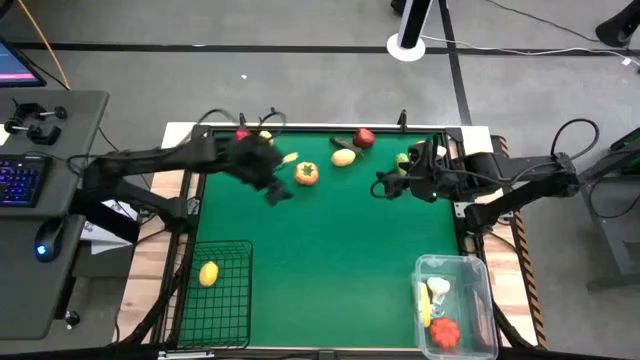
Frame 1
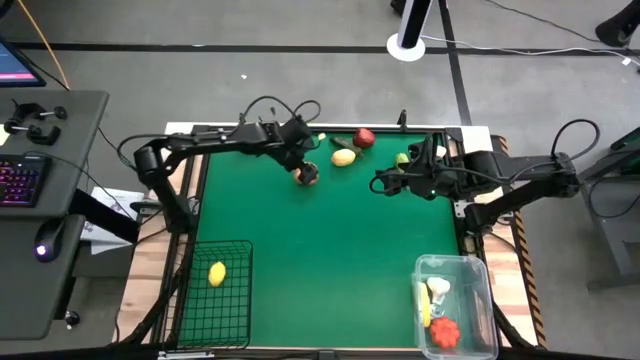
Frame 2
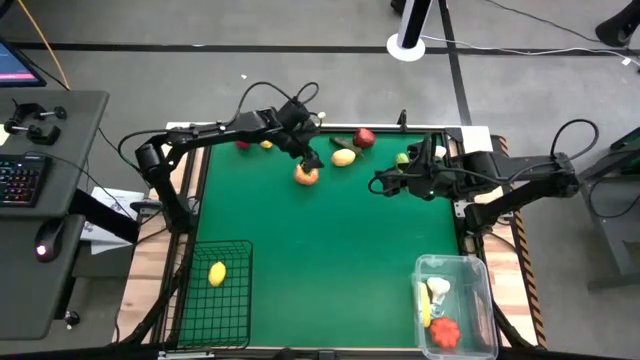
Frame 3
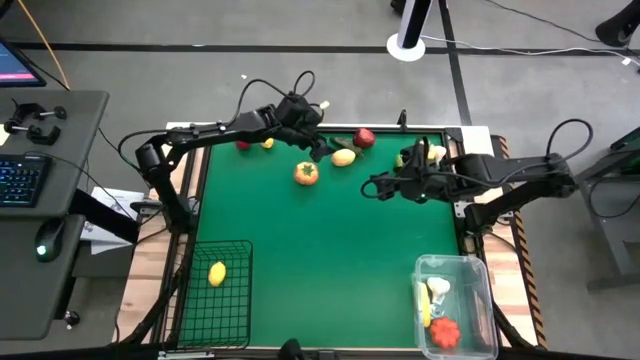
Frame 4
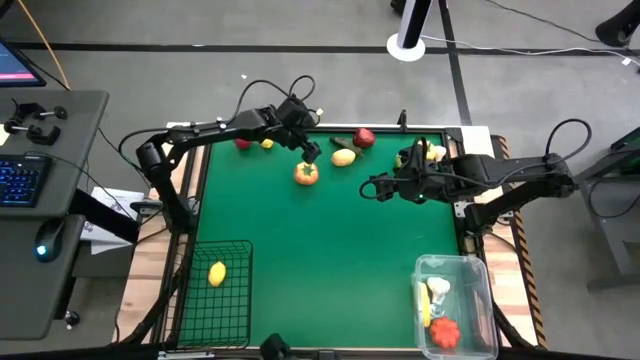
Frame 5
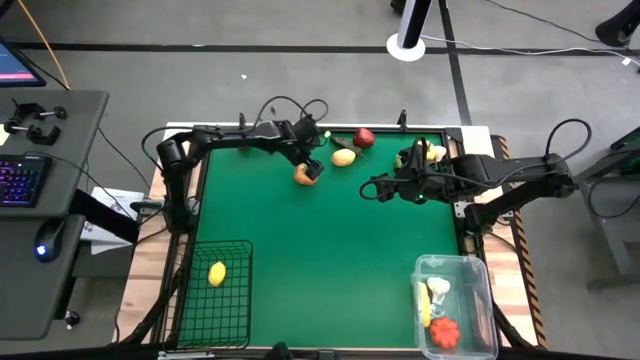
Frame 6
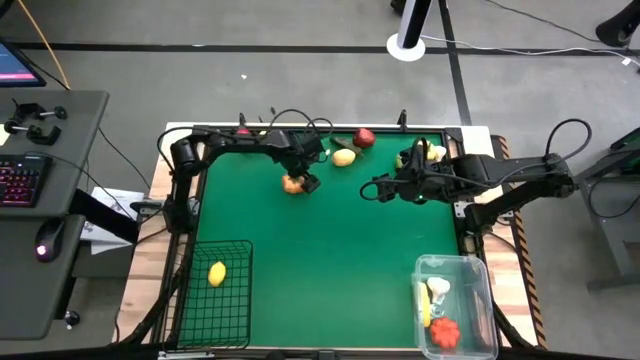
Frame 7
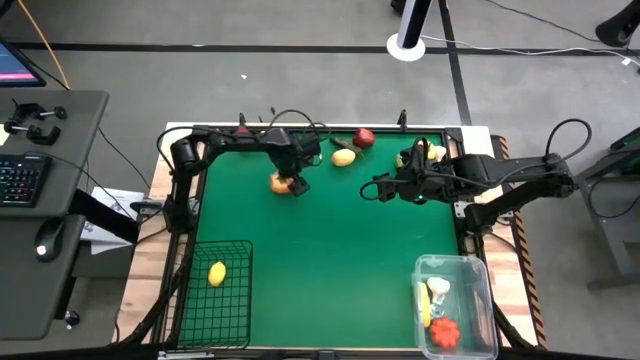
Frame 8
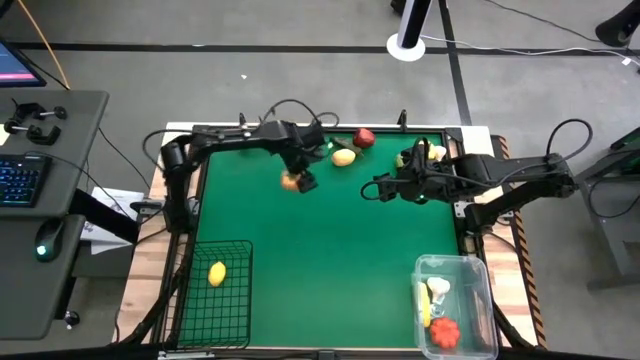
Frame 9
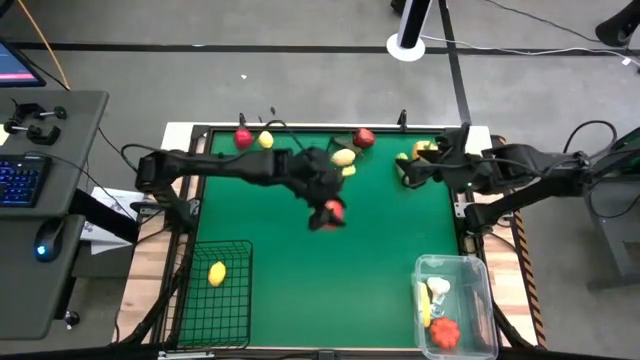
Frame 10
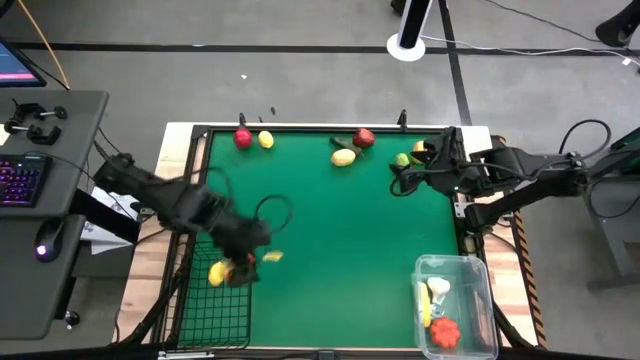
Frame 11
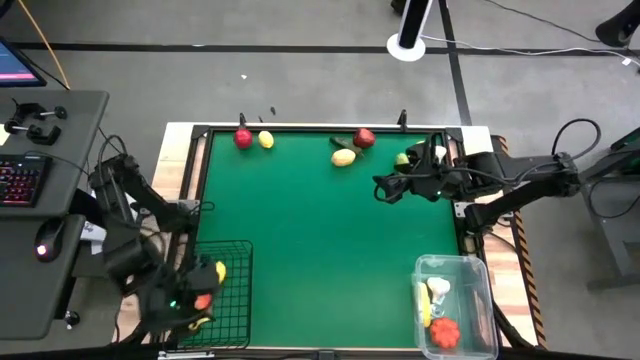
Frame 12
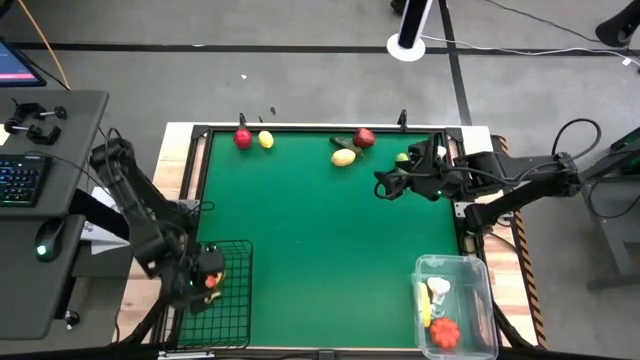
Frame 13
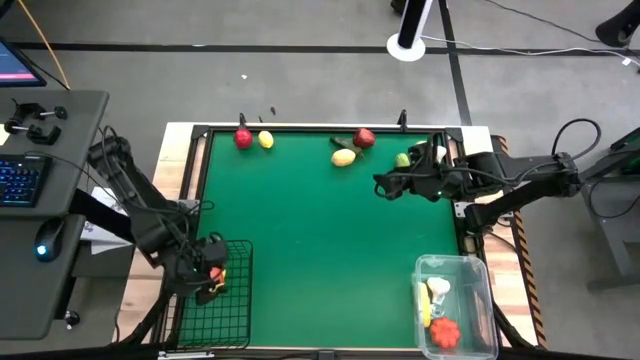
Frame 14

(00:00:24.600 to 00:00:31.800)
Task: Sort produce into baskets
Put the orange tomato into the black wire basket

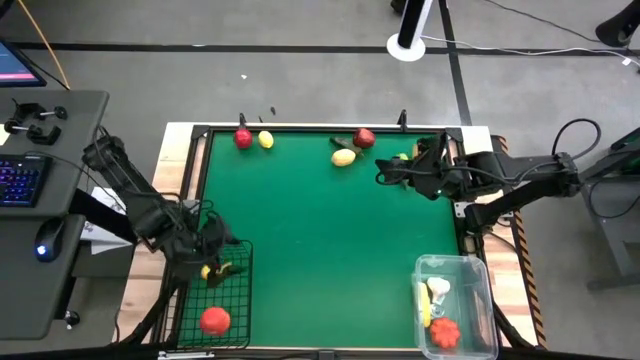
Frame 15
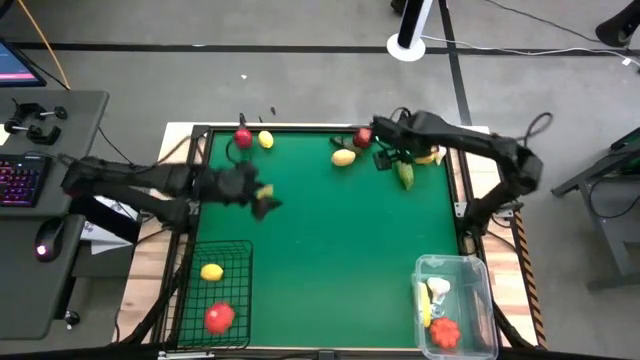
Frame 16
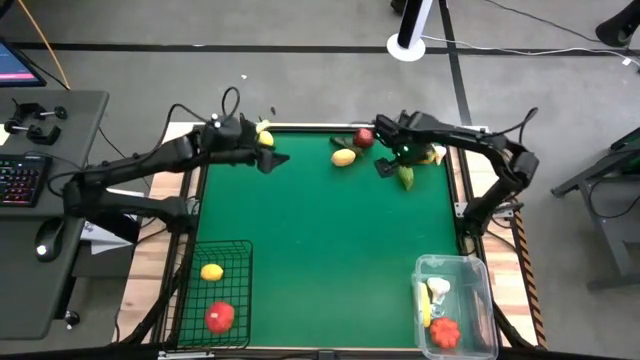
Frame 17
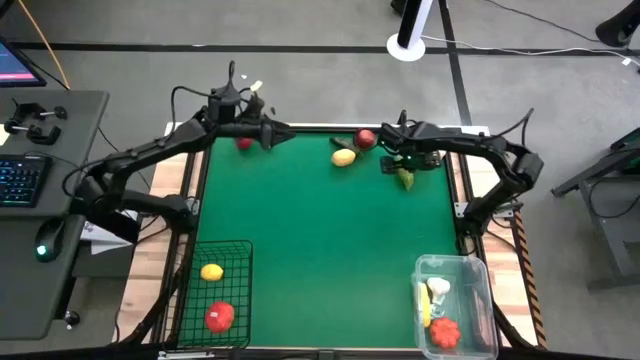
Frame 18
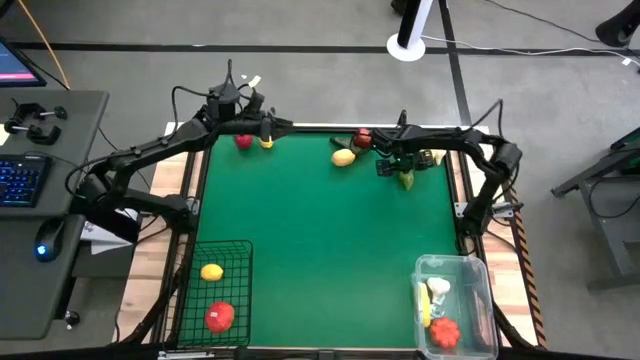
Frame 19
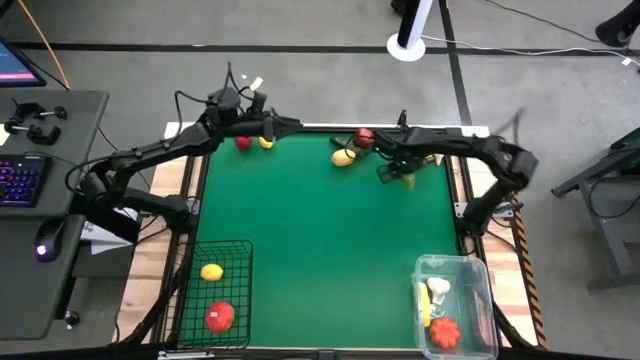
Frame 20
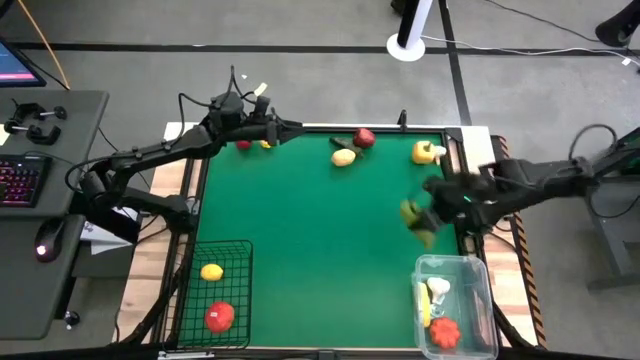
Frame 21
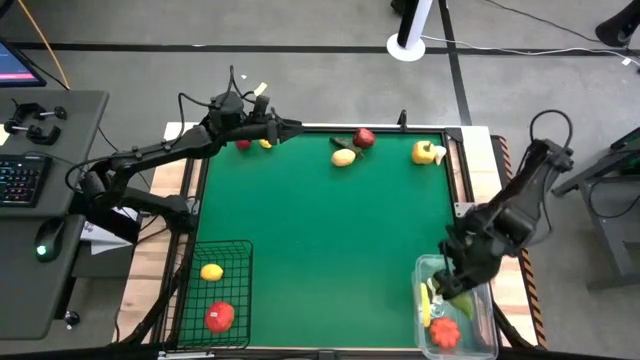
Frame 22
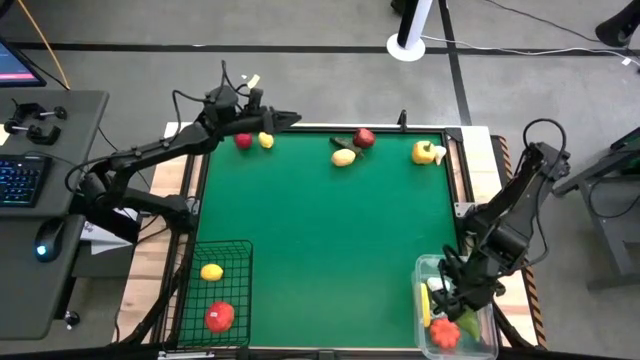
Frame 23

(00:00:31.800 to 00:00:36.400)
Put the green chayote into the transparent bin

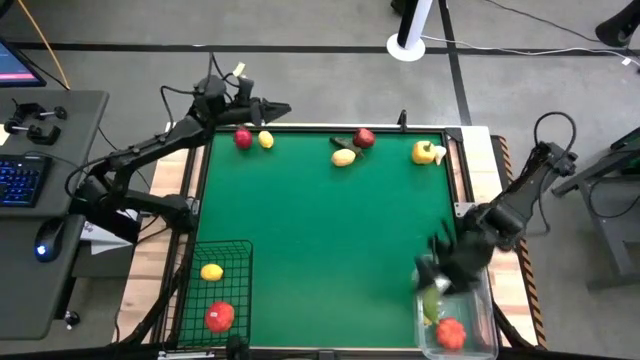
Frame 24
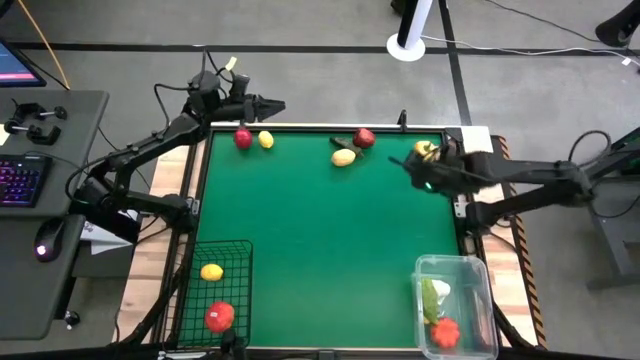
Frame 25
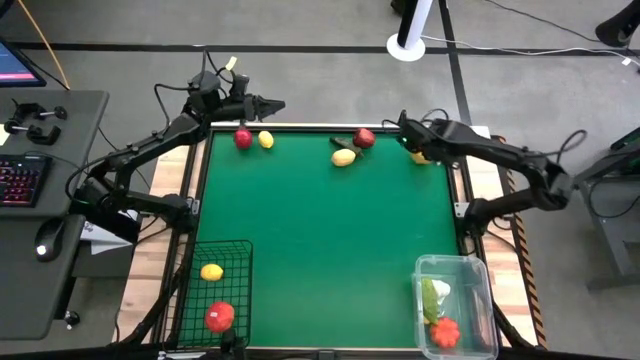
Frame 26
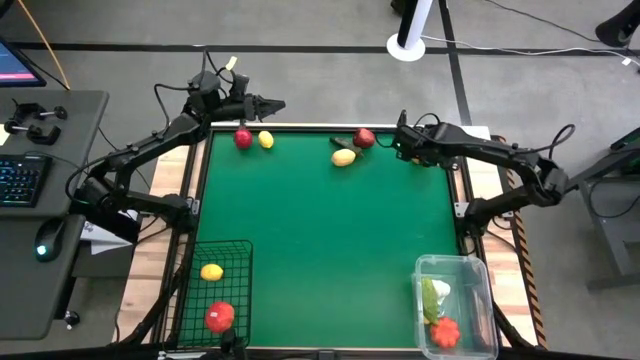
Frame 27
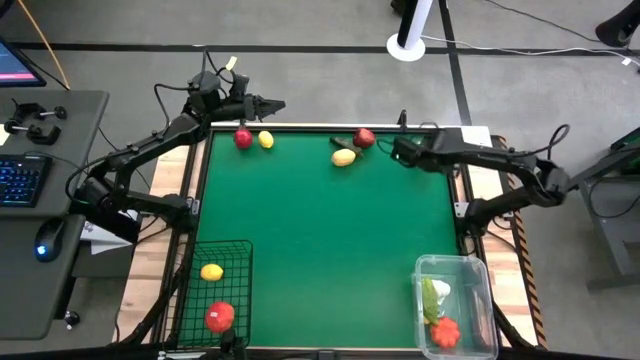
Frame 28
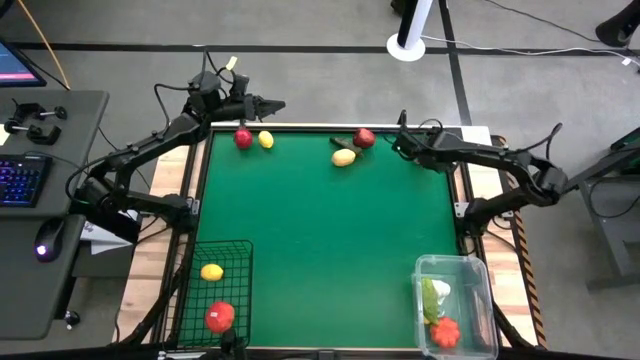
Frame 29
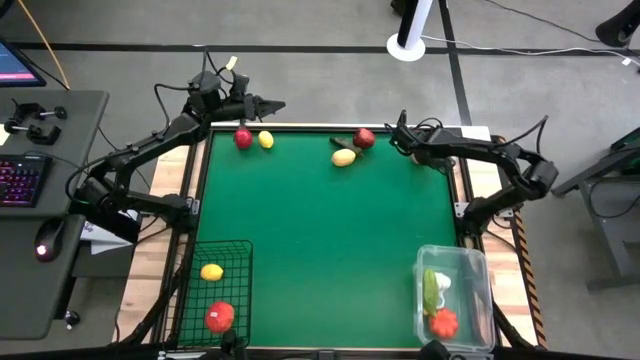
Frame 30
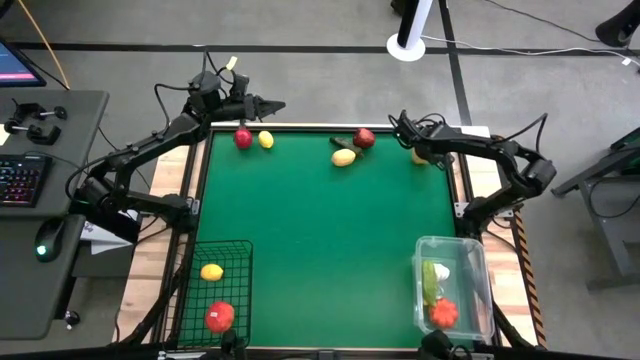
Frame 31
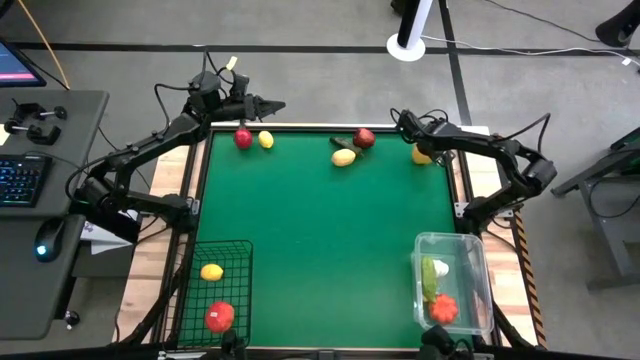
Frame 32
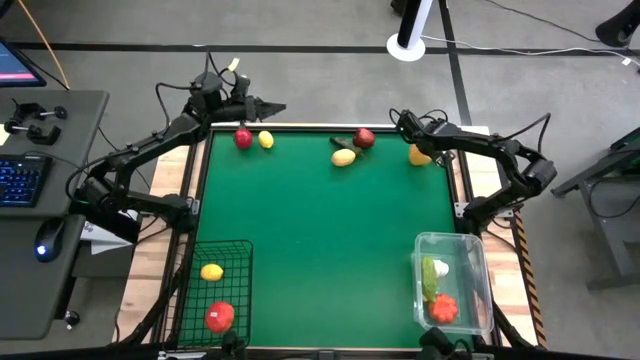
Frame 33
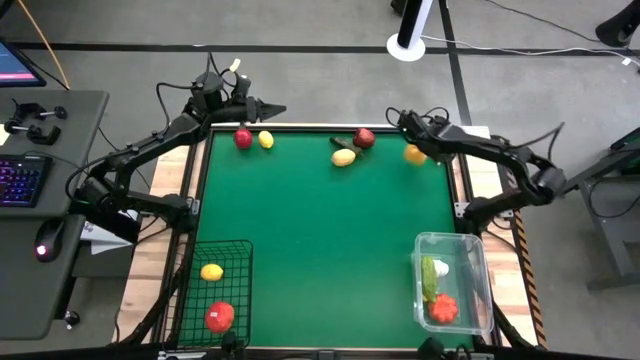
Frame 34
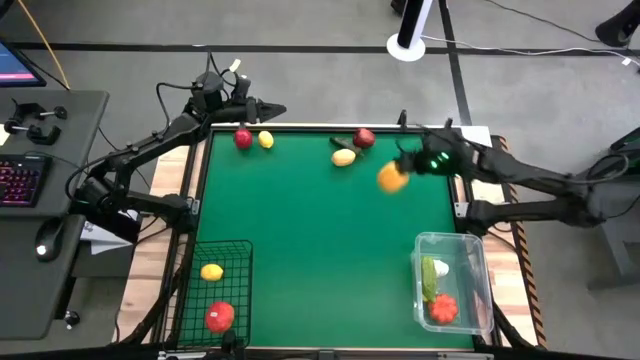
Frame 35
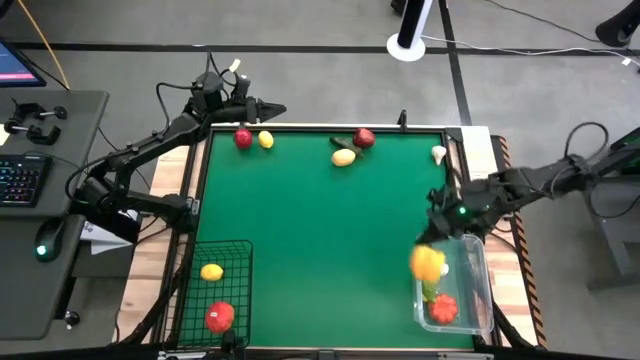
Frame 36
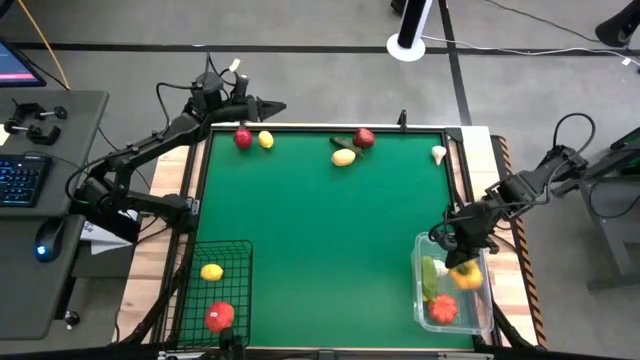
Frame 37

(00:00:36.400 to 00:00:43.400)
Put the yellow bell pepper into the transparent bin

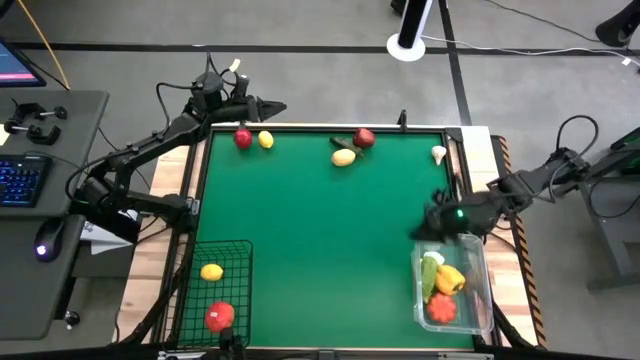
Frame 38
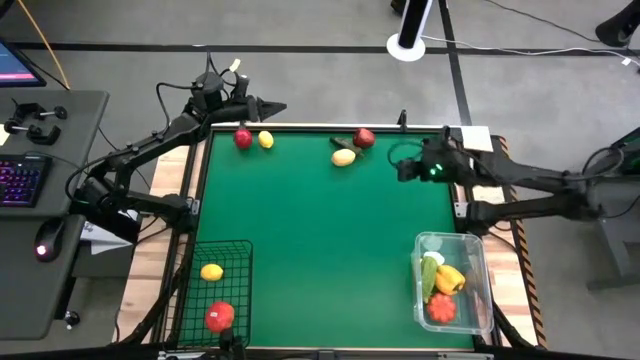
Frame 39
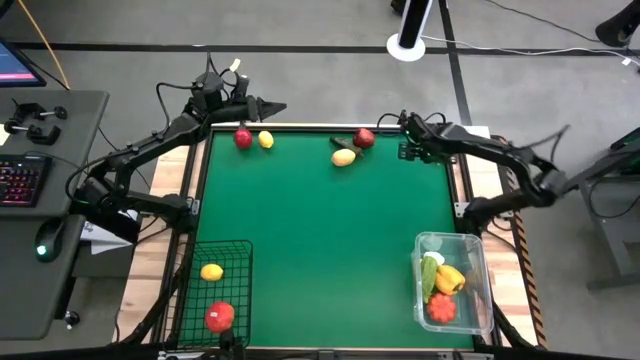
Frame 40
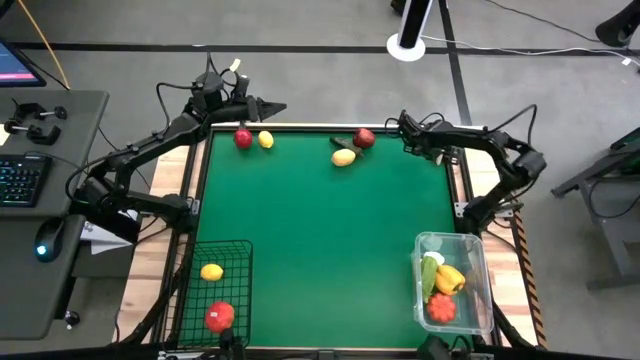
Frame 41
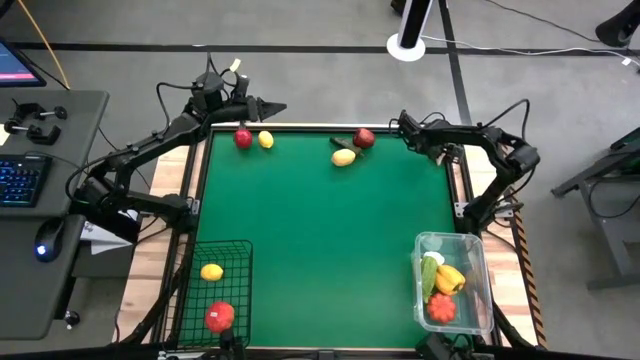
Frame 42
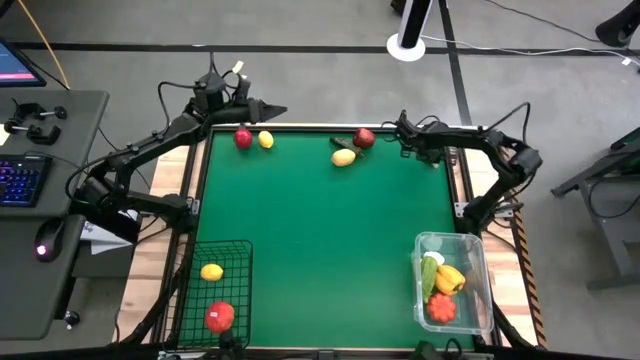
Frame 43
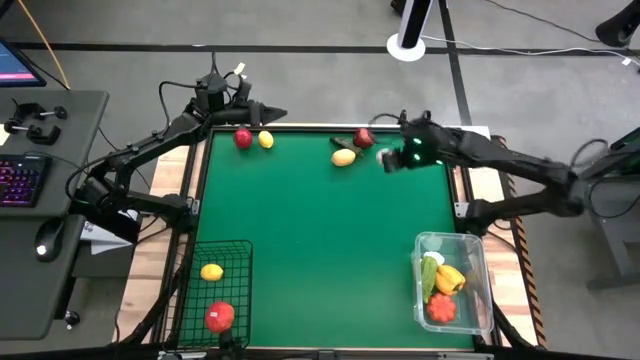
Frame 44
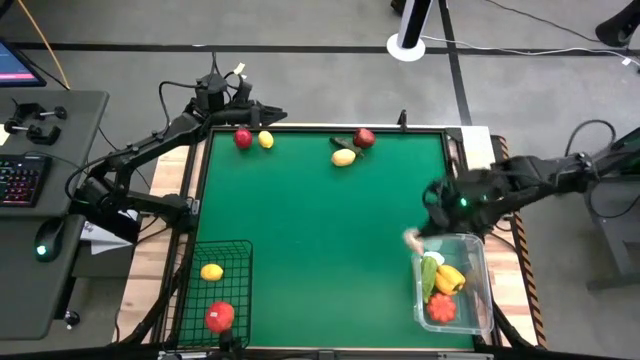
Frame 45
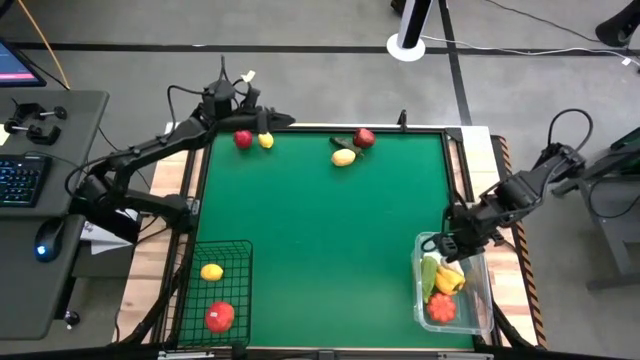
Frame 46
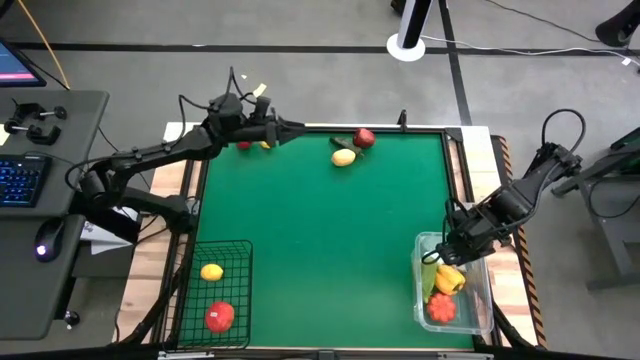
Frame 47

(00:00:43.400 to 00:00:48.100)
Put the white garlic into the transparent bin
